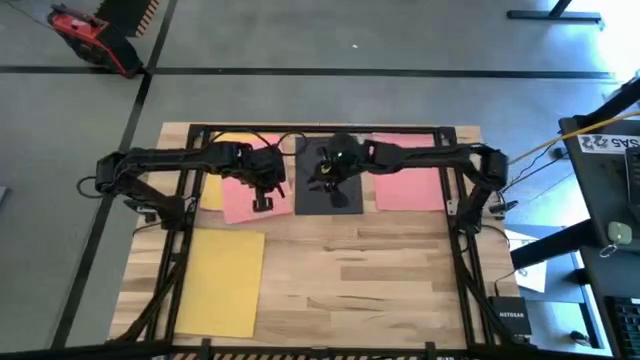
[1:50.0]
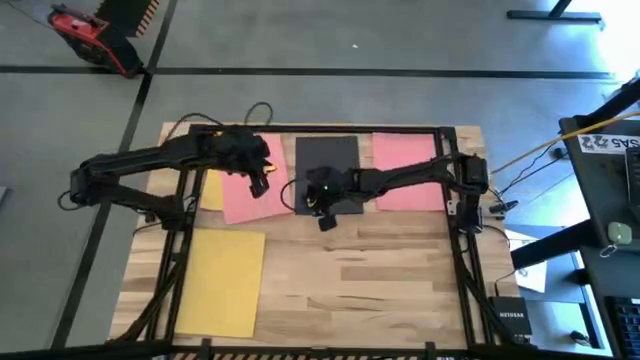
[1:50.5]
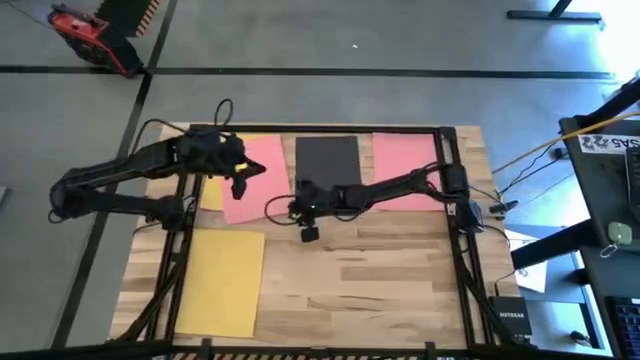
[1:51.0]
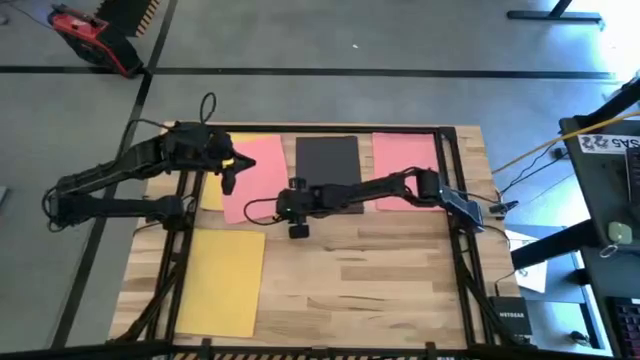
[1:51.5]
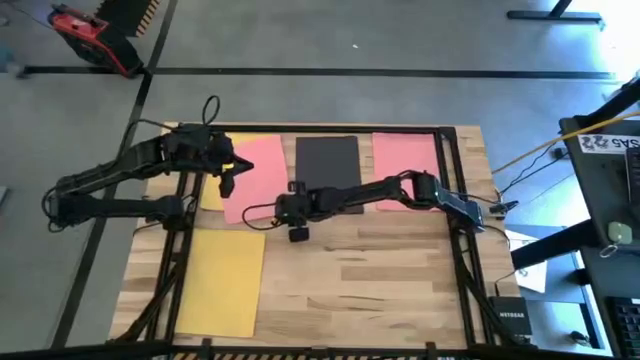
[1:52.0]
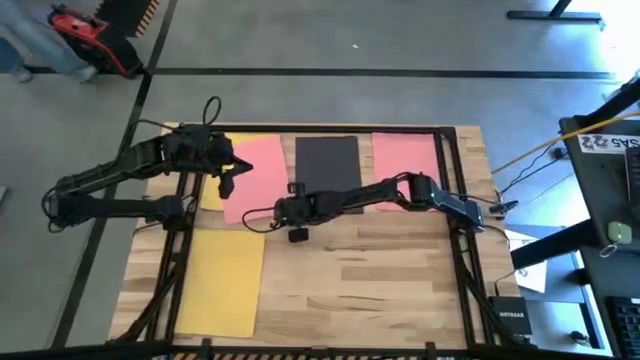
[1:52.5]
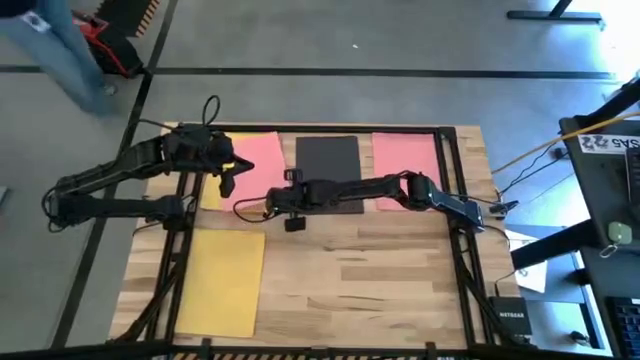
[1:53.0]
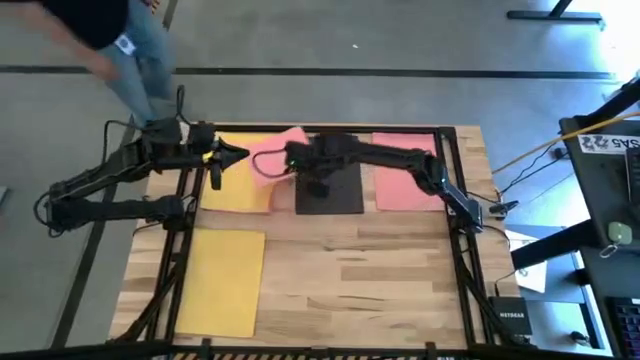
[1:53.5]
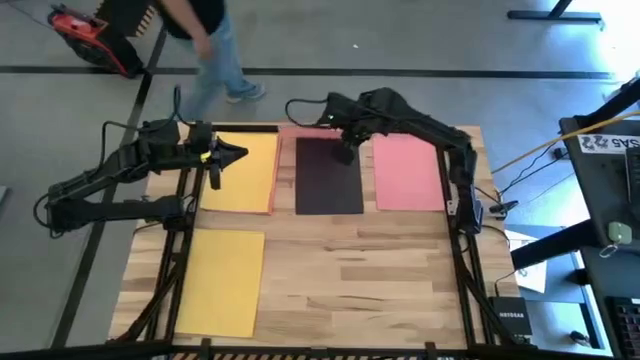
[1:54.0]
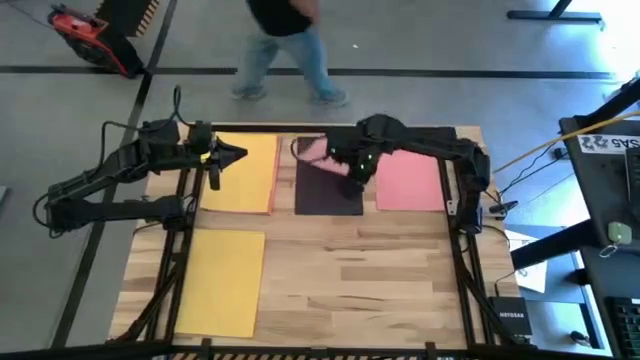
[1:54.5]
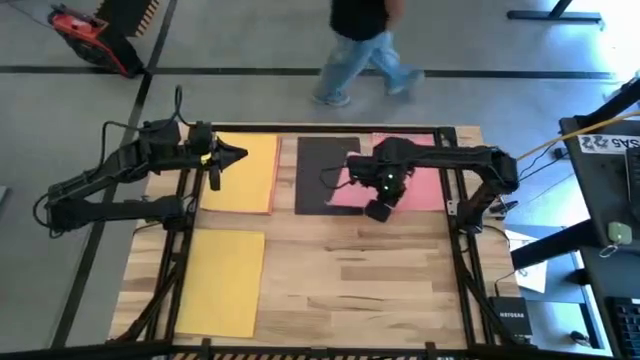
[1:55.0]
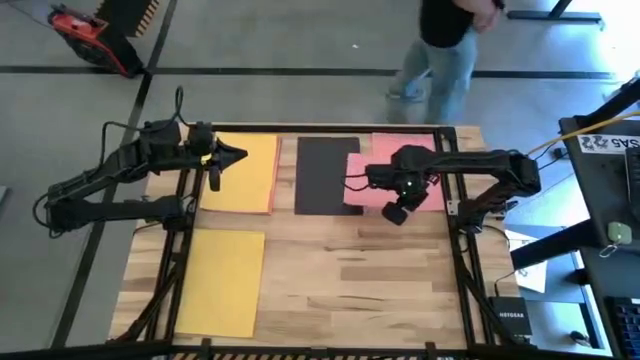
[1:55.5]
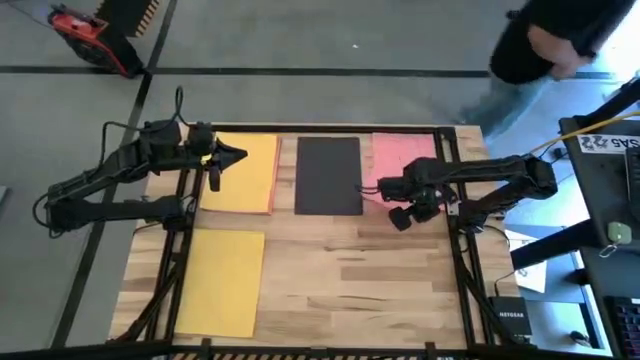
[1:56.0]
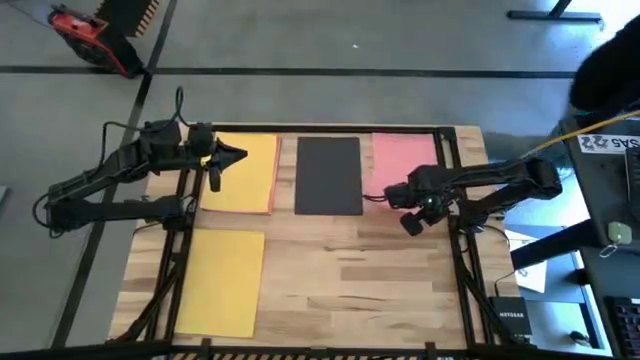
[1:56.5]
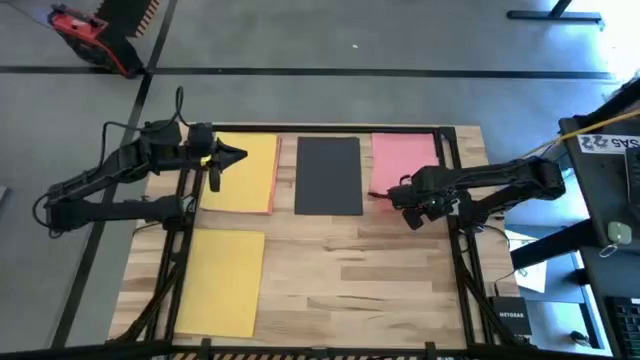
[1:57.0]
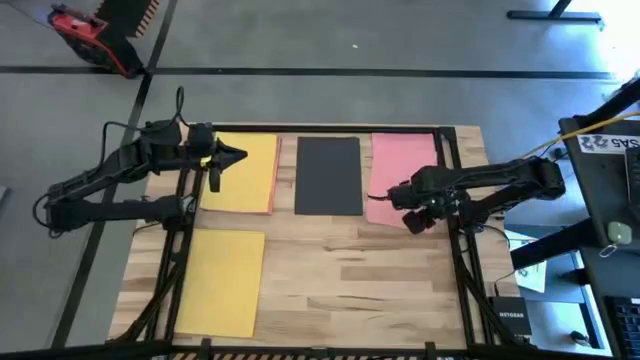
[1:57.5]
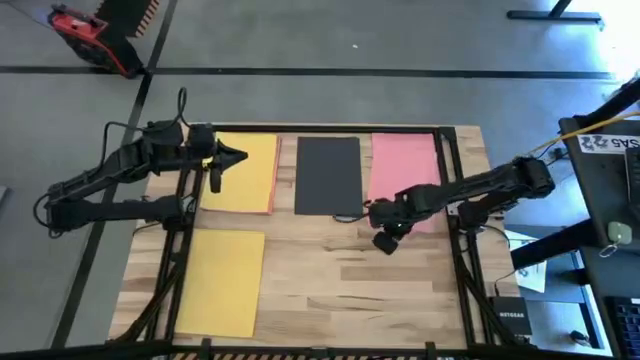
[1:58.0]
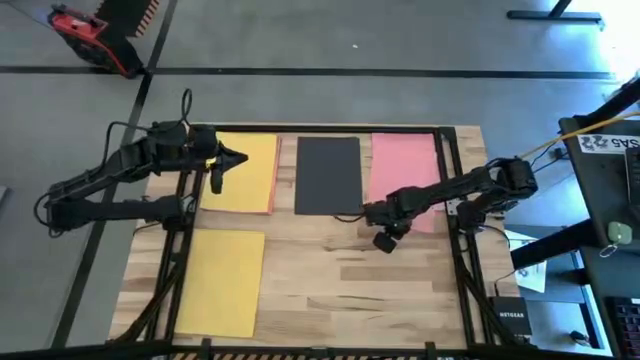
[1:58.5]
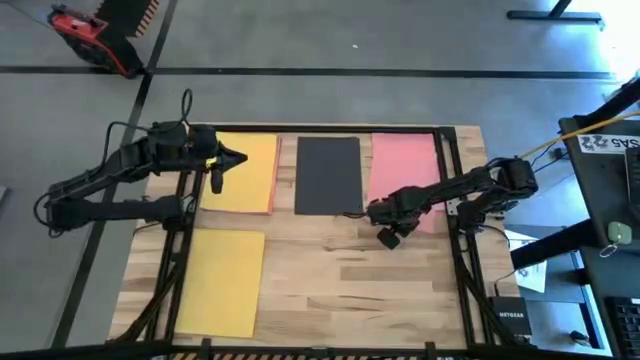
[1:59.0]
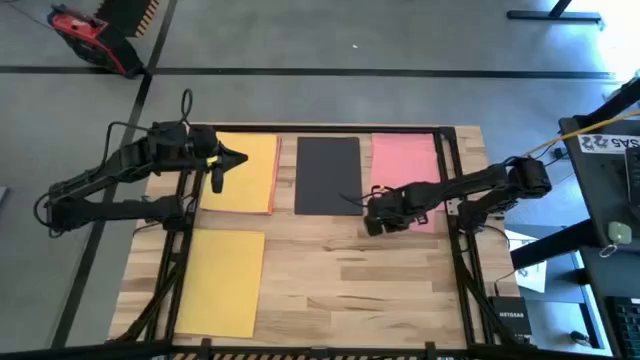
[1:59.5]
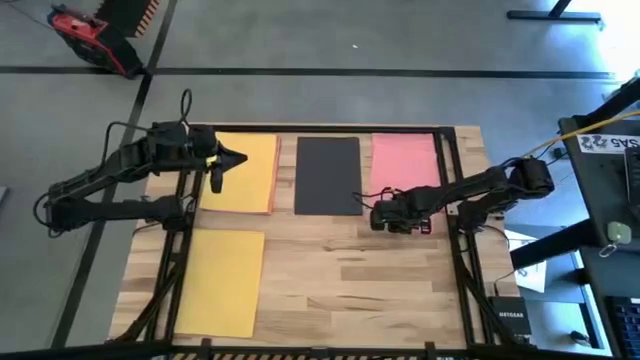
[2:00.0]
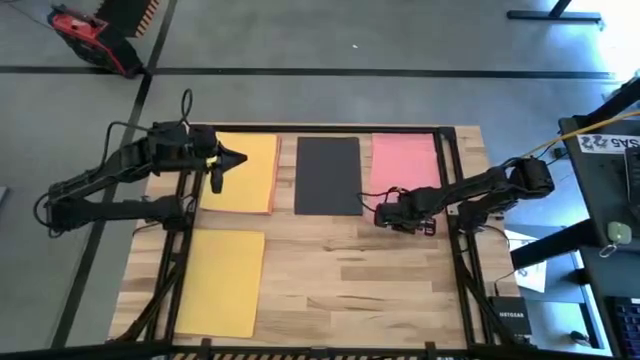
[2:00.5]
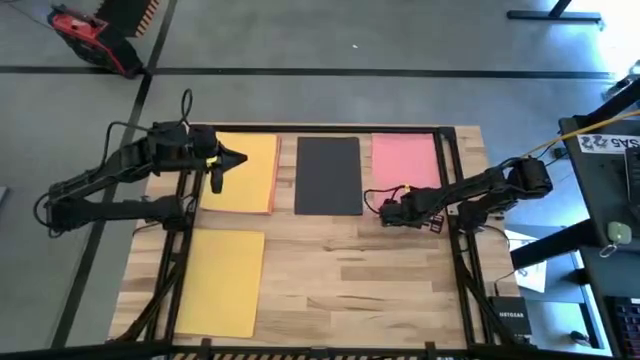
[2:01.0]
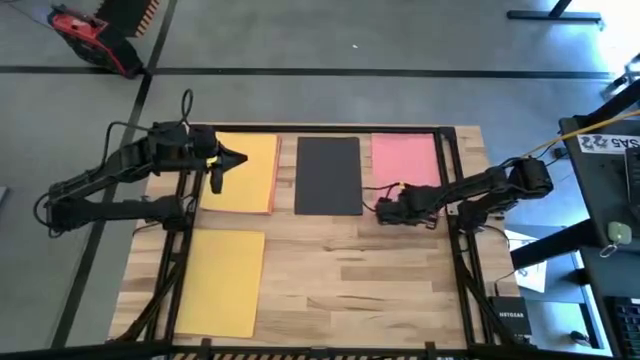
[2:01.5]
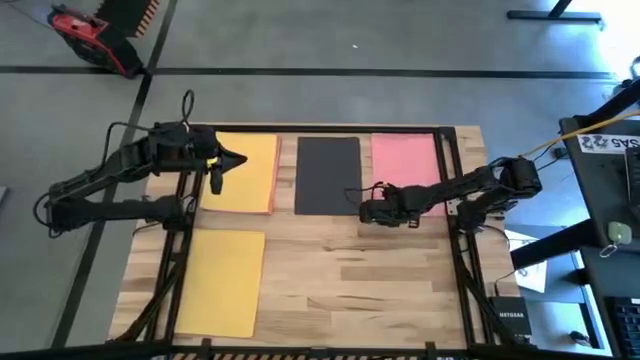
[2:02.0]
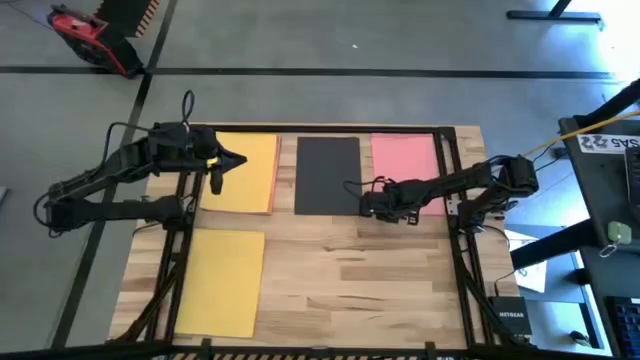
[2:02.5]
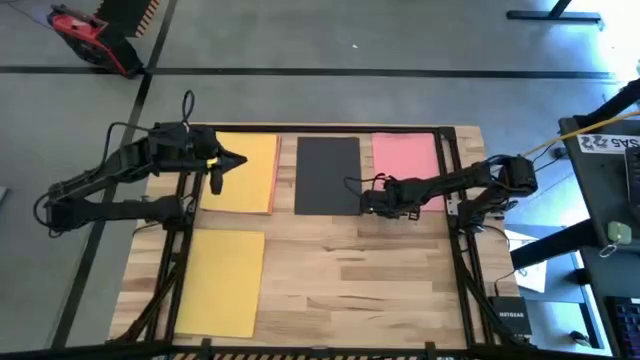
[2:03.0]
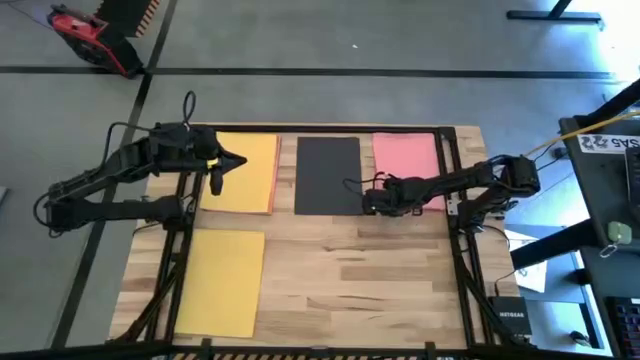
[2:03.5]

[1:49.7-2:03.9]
Task: Organize paper
Stack the pink paper on top of the other pink paper

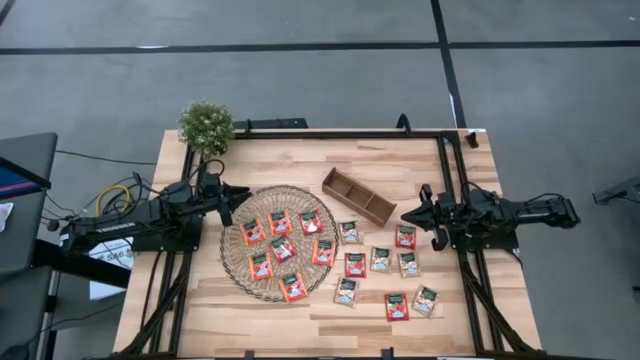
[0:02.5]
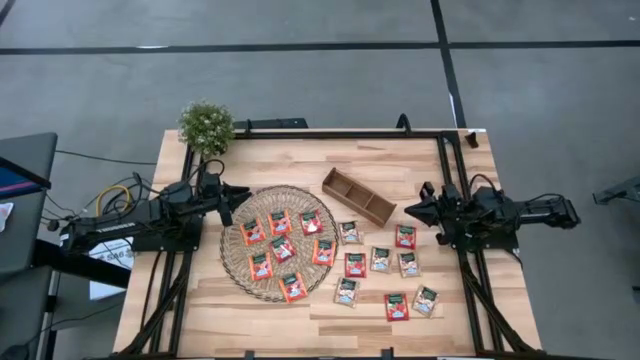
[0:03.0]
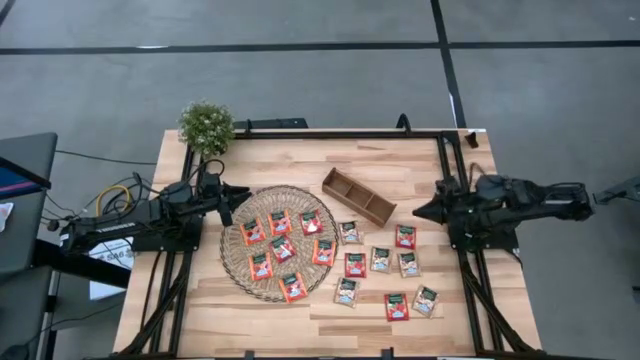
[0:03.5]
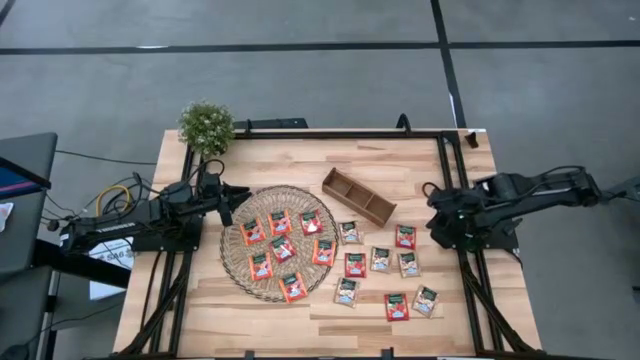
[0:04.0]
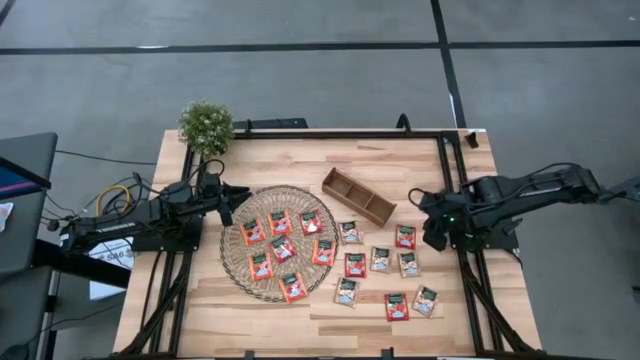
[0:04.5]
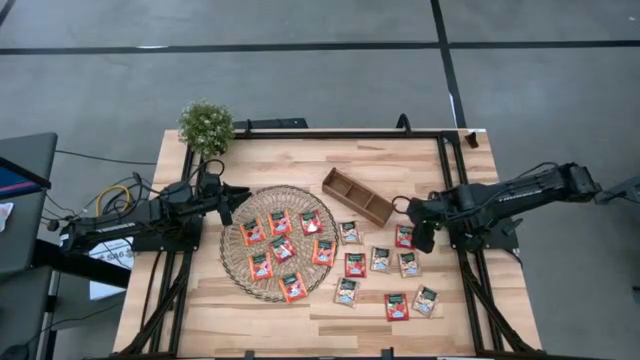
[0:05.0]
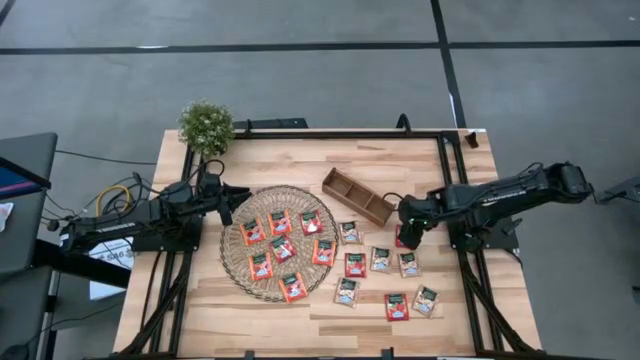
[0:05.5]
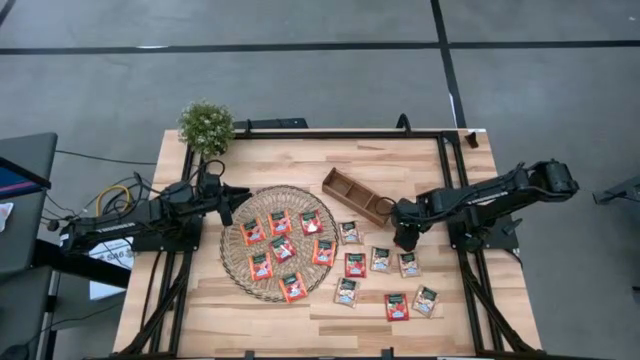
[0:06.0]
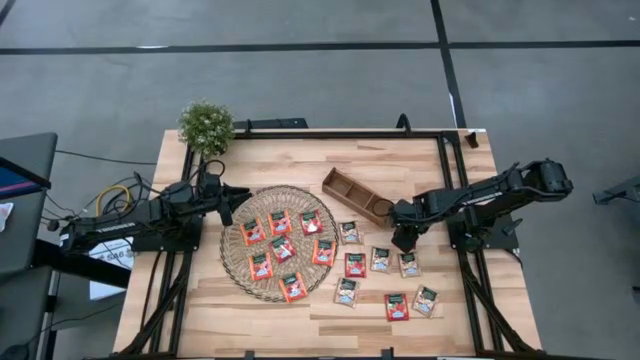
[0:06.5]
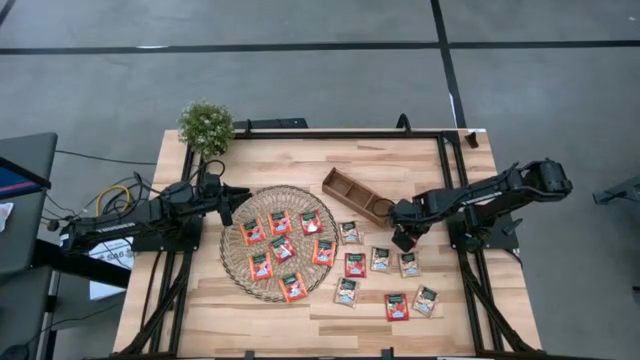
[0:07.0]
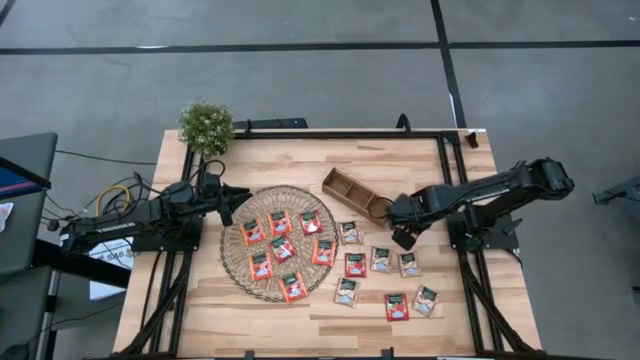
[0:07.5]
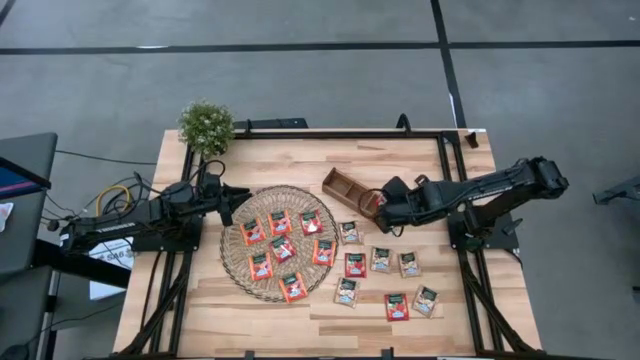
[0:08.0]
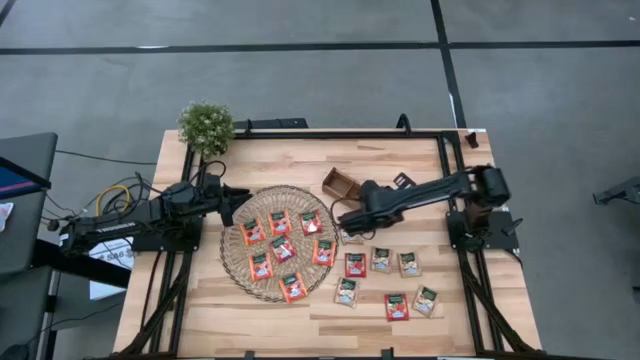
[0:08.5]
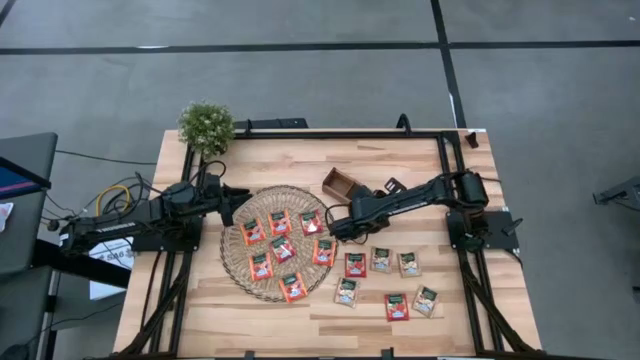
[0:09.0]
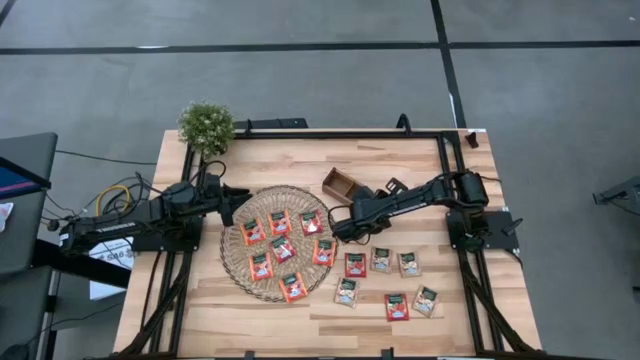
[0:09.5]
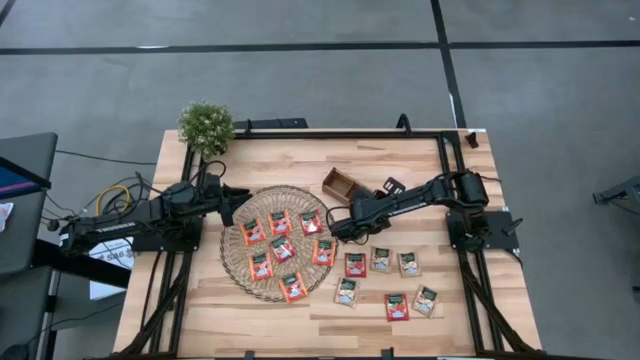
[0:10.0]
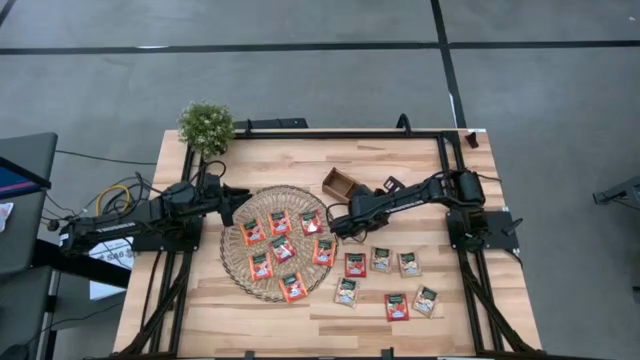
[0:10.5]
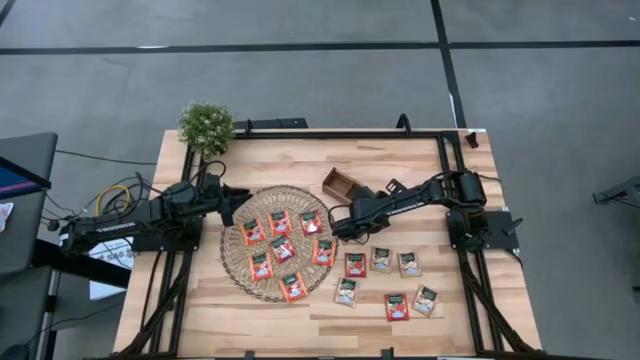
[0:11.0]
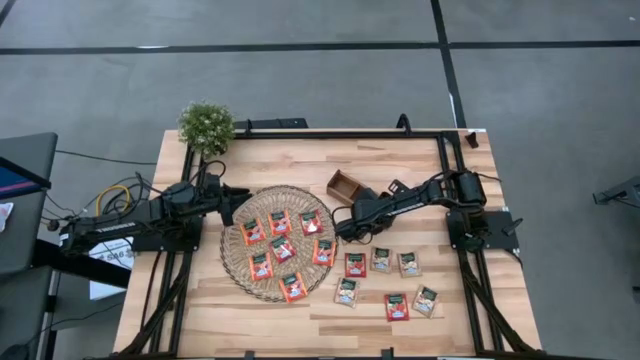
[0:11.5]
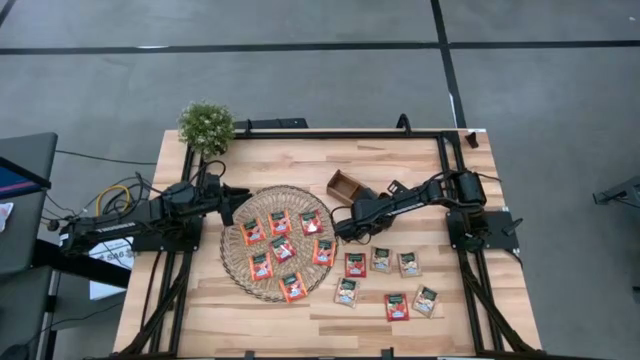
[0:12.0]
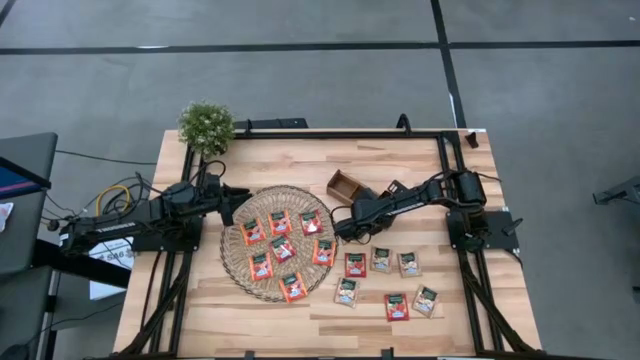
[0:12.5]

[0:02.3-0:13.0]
Task: Pick & Place Tea
Put the red tea bag into the right section of the wooden organizer
